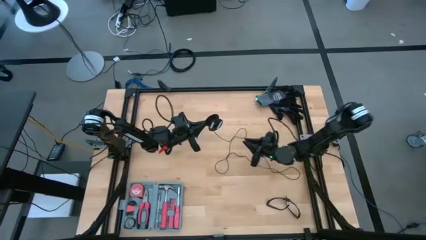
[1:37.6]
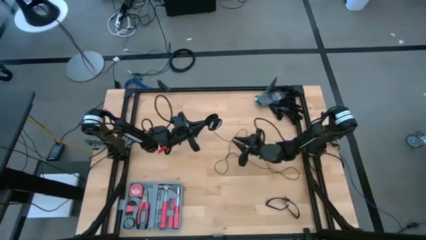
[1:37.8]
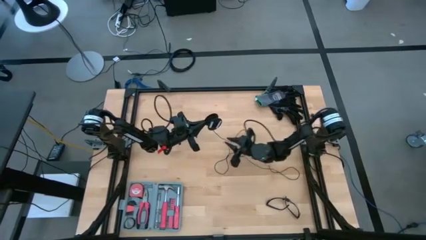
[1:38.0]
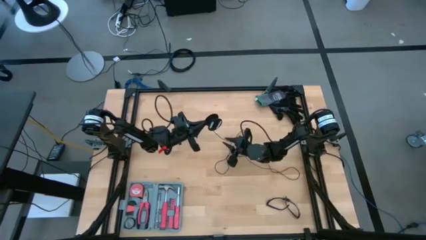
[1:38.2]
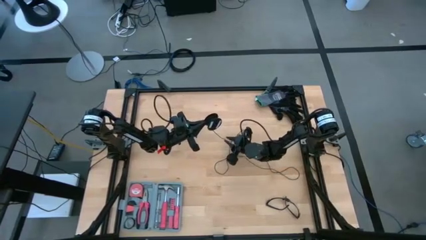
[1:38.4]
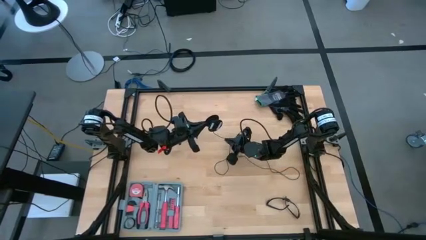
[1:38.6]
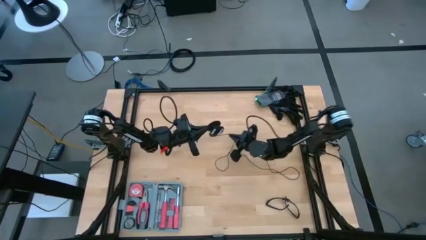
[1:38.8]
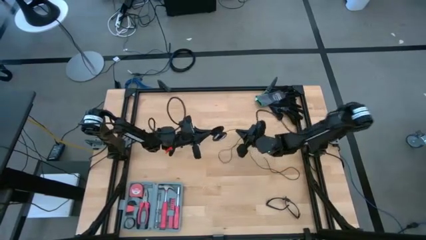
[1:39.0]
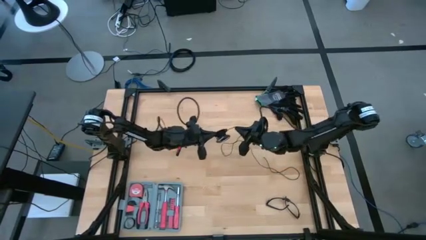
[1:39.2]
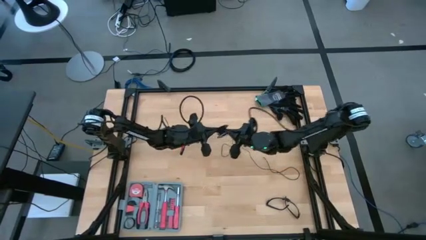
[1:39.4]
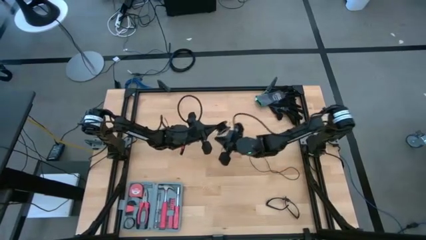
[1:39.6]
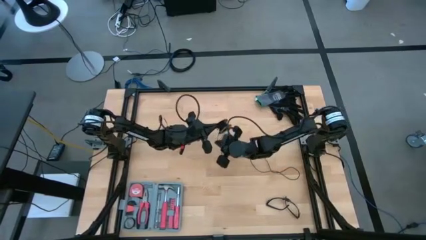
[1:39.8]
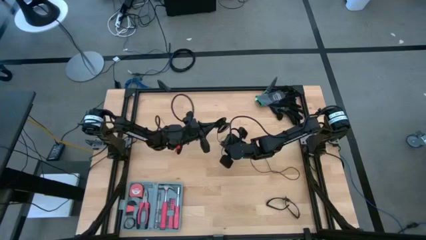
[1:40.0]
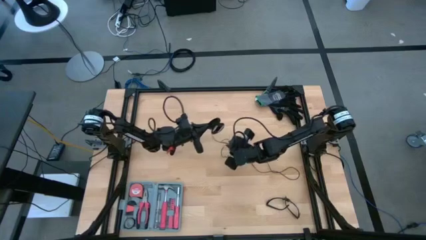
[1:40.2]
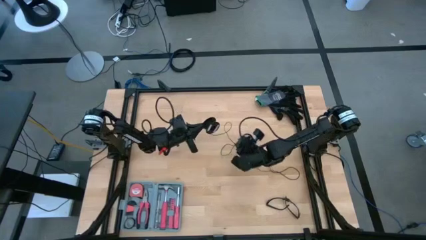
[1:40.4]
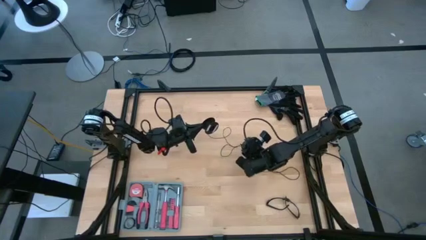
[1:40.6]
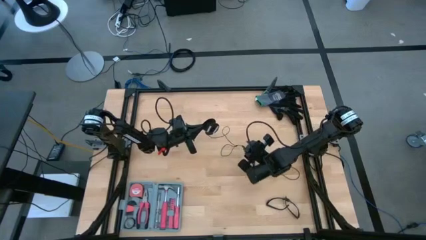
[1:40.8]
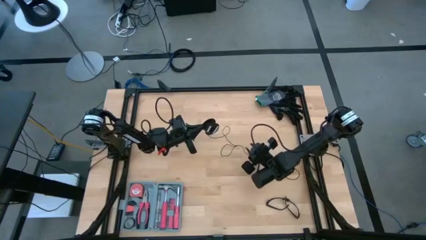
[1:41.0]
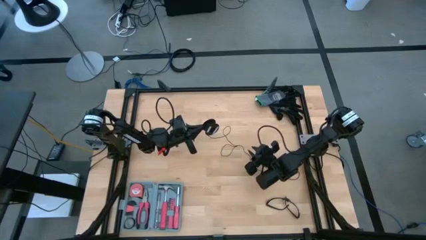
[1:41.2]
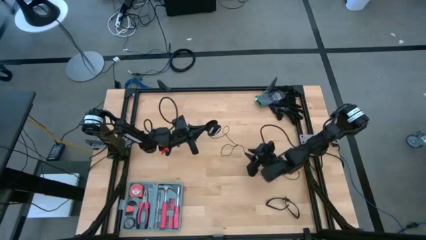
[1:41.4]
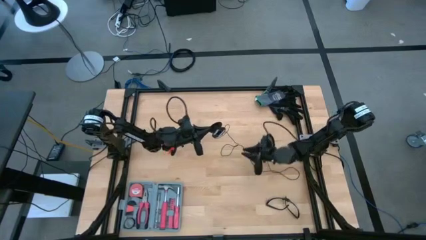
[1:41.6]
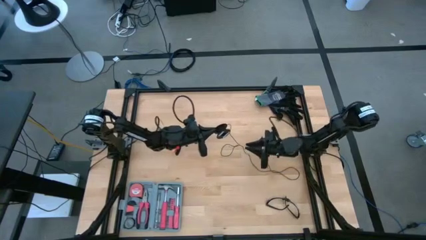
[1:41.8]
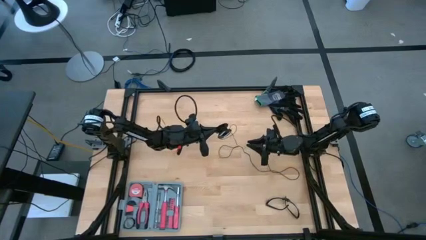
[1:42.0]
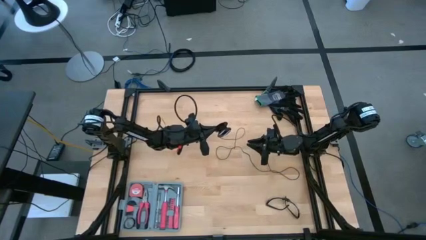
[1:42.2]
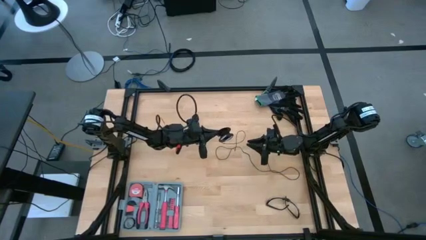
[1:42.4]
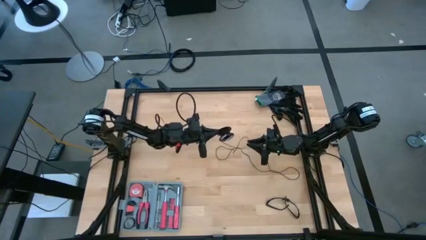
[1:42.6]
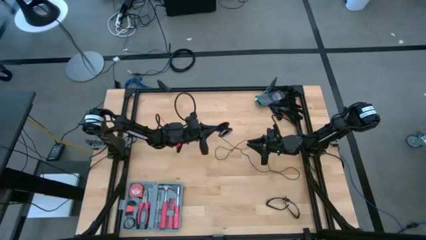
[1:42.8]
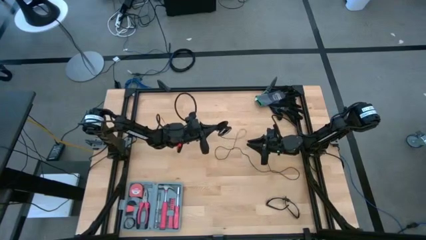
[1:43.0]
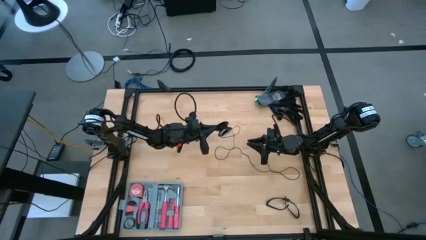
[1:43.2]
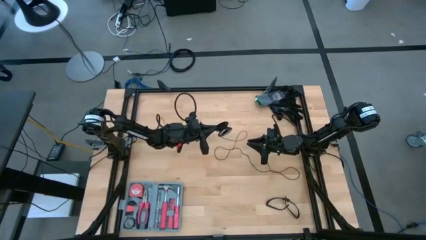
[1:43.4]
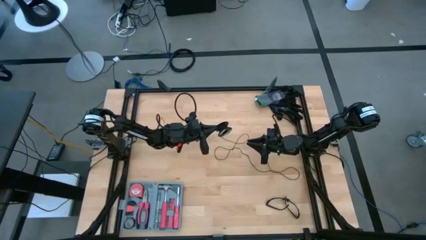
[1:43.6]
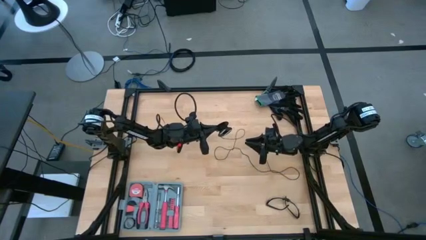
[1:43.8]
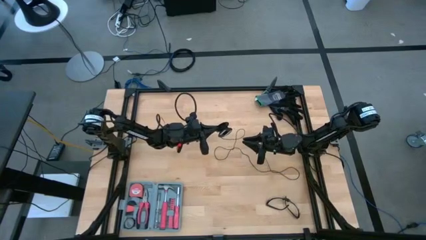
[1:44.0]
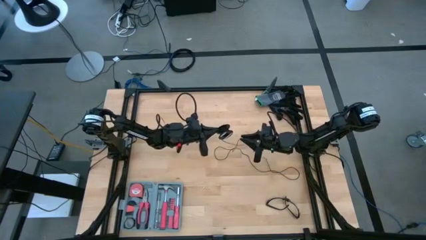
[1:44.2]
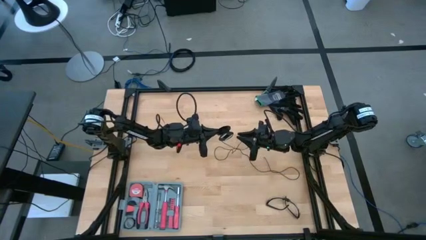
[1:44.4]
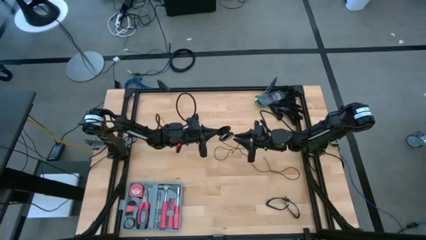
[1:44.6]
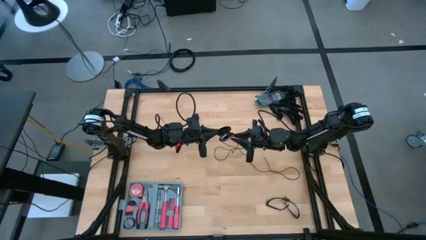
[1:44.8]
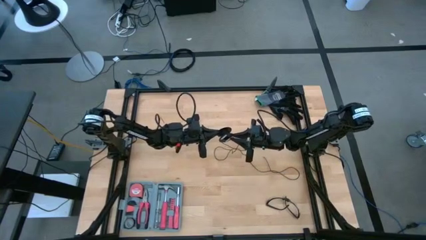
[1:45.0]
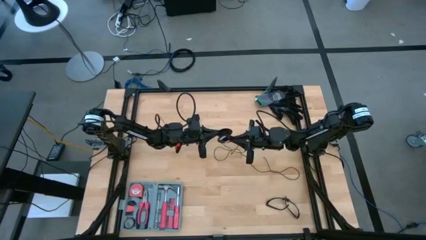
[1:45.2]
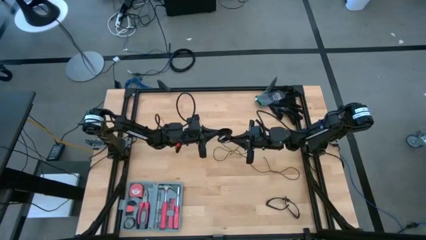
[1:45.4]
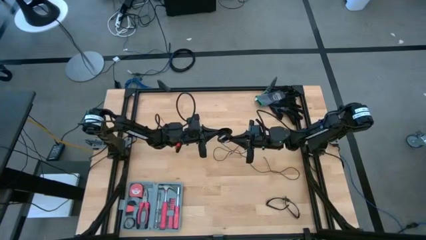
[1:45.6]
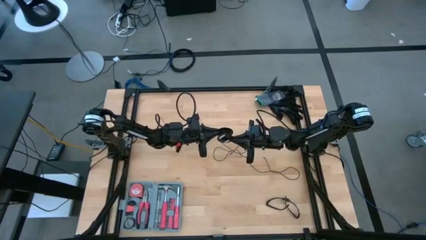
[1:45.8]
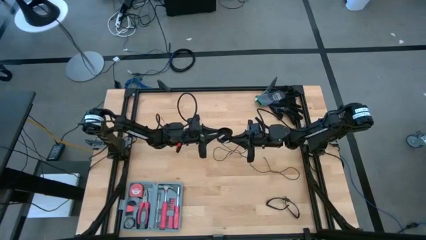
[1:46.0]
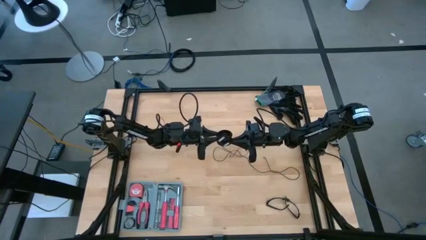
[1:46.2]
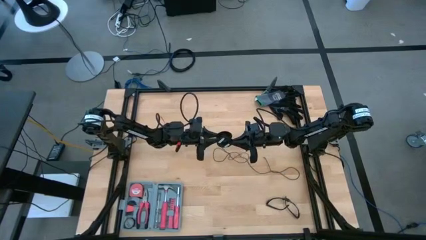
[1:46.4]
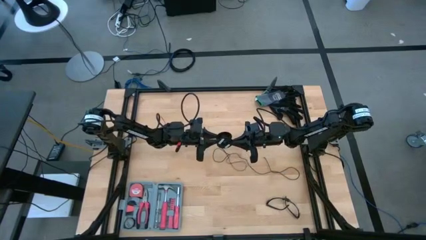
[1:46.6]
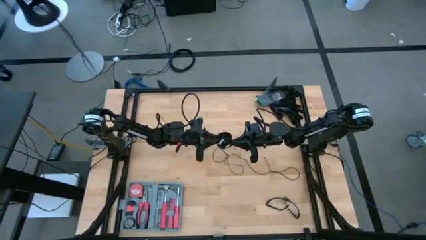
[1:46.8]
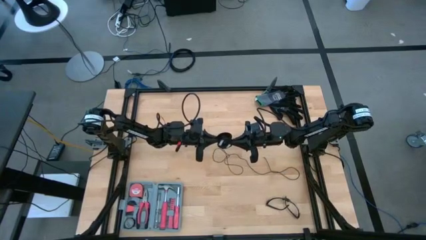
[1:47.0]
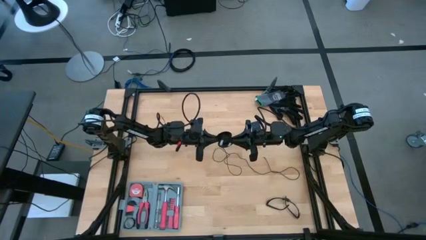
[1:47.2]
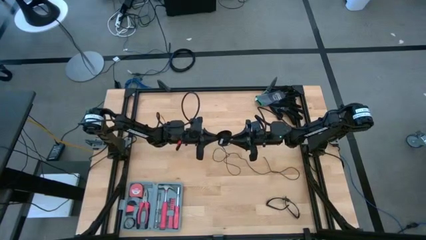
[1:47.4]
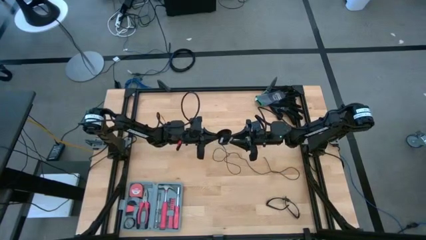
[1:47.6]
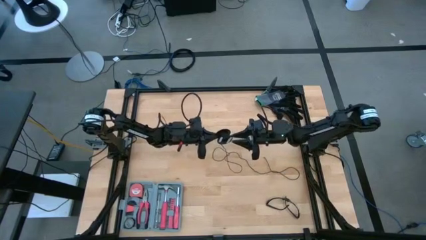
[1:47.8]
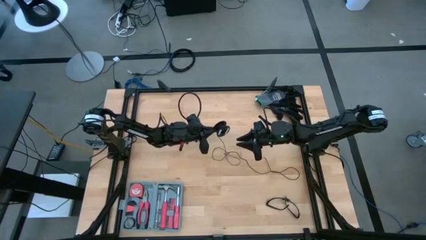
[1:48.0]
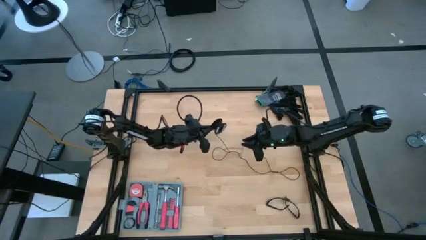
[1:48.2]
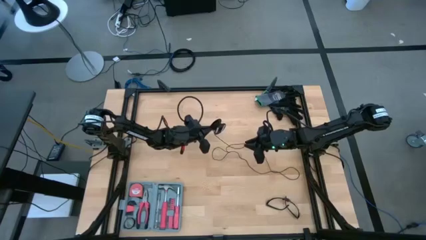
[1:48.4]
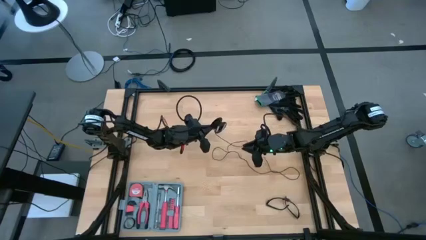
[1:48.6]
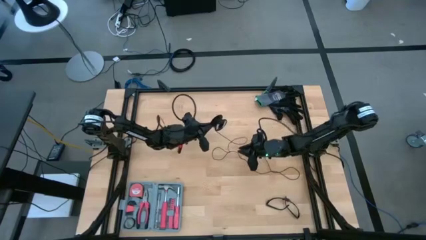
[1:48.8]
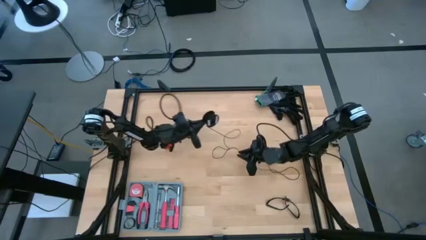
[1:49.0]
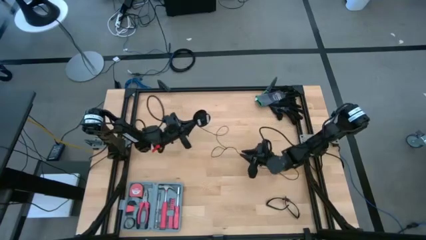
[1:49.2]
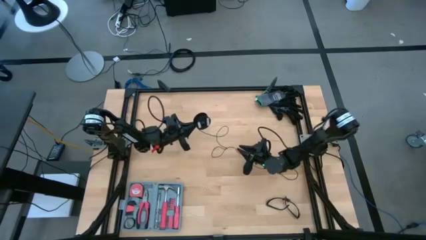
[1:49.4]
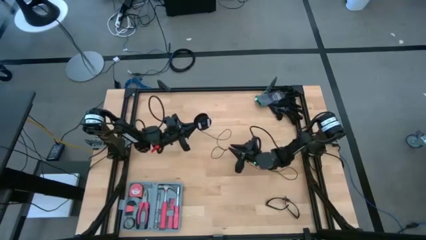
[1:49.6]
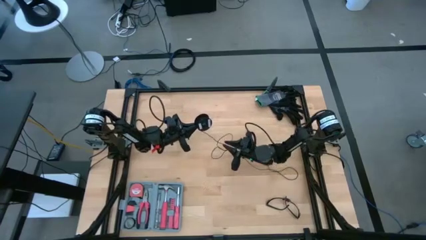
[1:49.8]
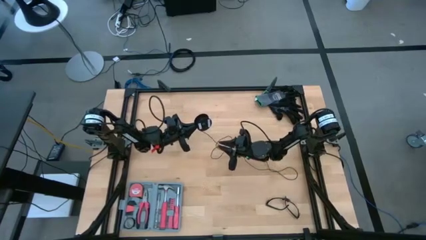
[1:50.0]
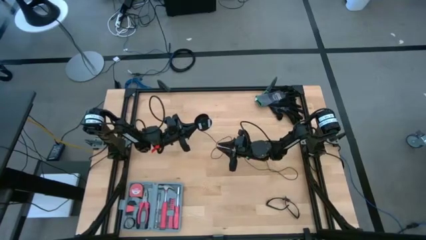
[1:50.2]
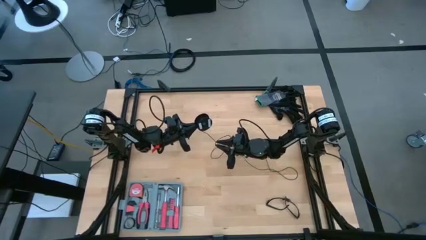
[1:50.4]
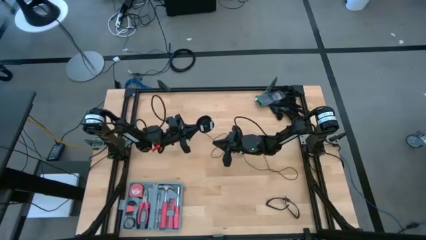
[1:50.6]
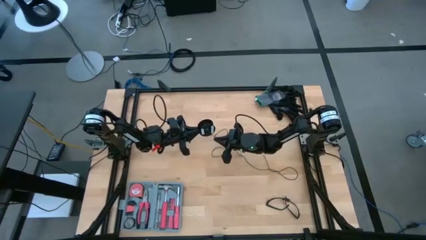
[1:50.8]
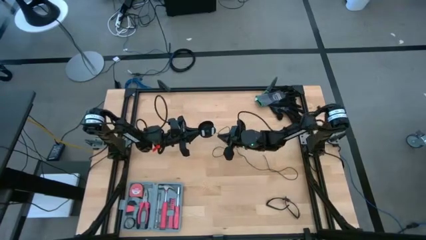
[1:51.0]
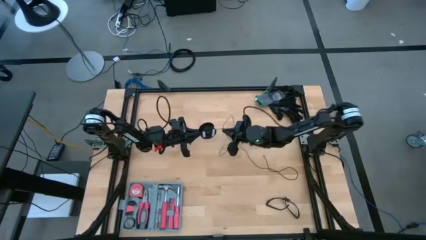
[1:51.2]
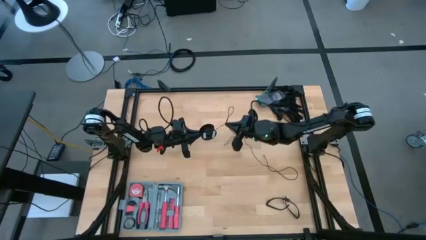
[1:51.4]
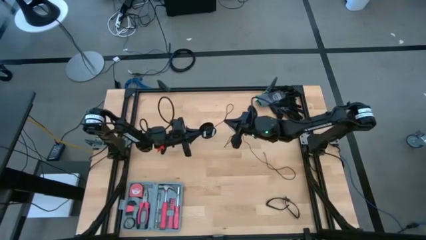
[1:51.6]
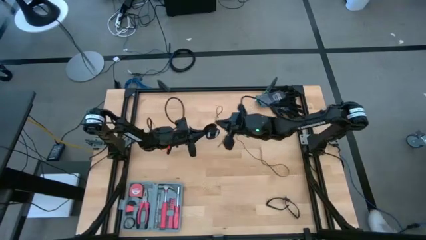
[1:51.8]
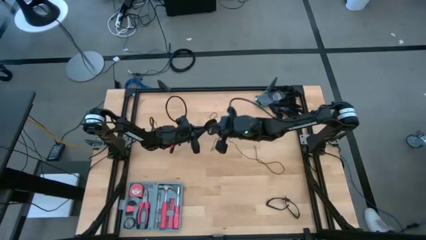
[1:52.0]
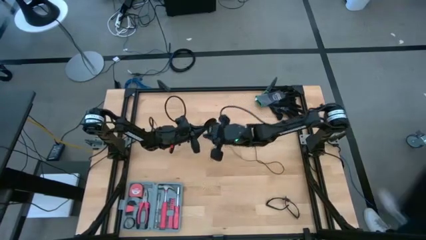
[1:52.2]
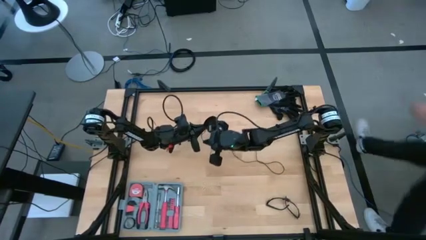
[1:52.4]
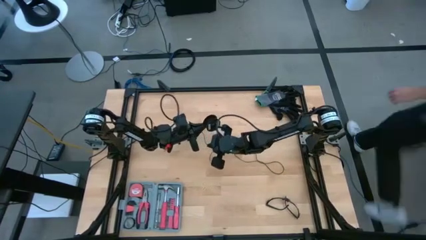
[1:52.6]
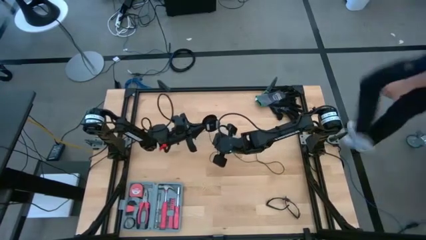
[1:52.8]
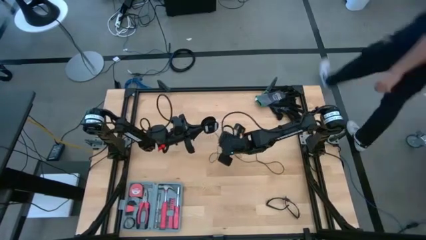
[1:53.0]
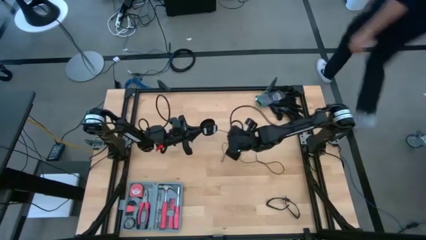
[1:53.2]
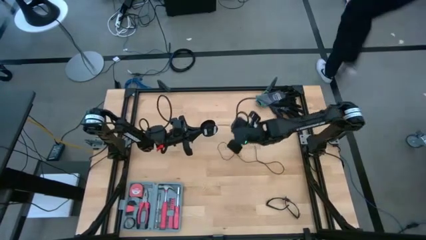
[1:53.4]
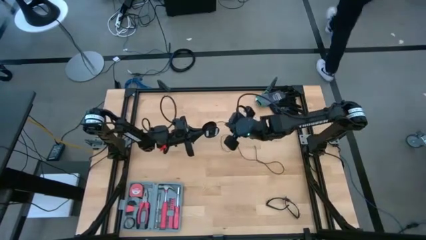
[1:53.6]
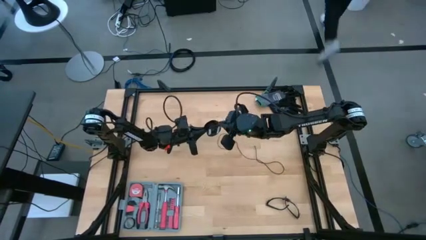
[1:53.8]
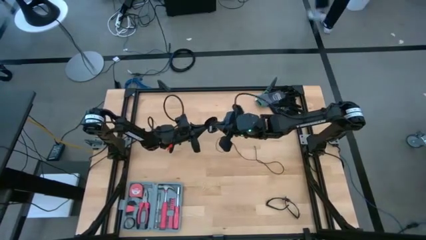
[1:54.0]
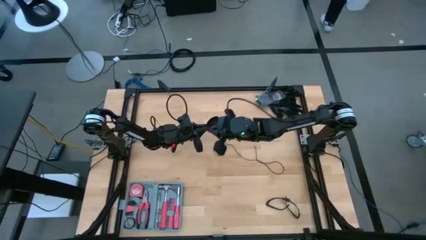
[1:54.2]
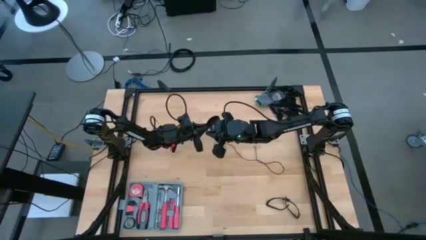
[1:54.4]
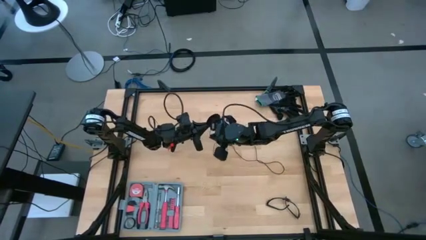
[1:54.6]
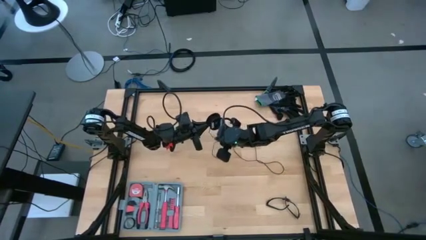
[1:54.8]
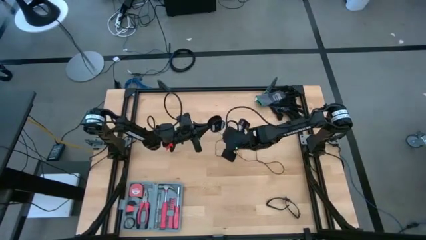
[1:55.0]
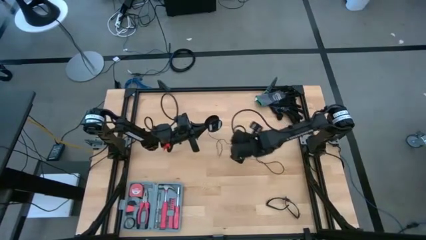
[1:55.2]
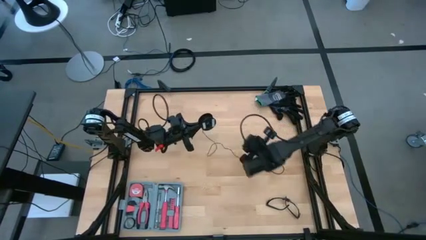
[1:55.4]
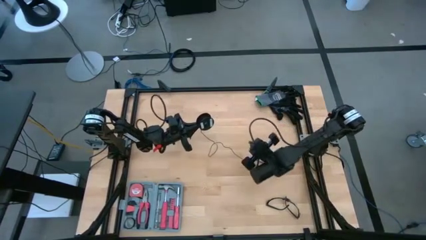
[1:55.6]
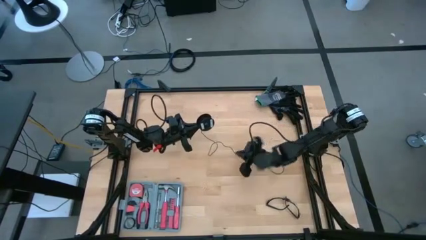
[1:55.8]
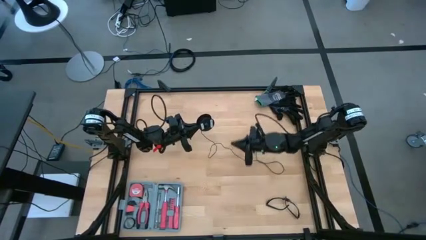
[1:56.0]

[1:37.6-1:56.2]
Task: Coil cords
Coil the black wire onto the spool
